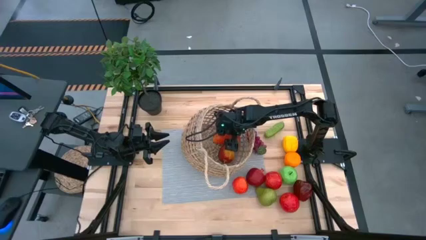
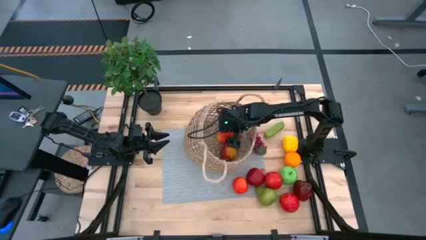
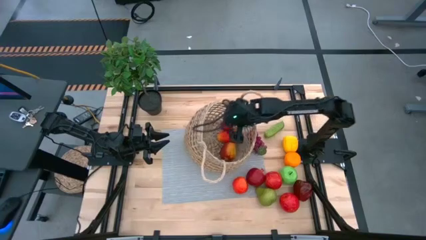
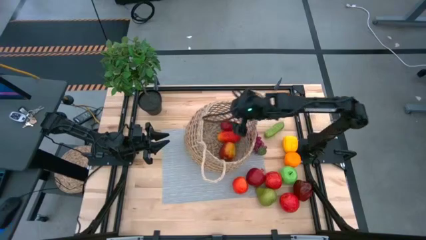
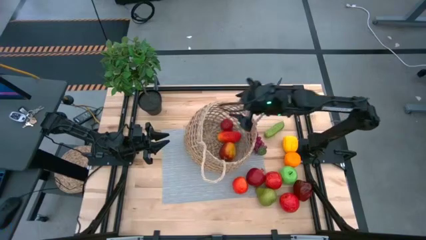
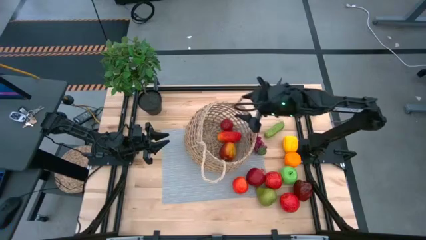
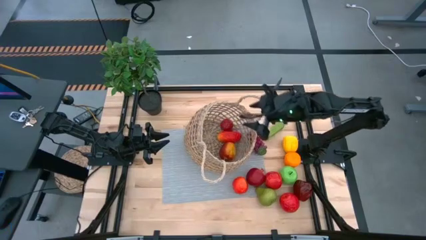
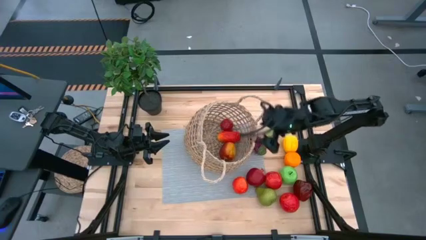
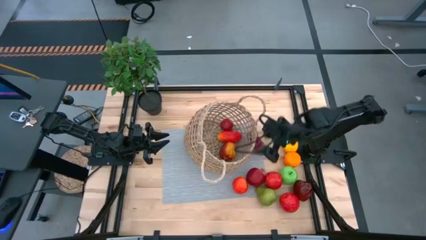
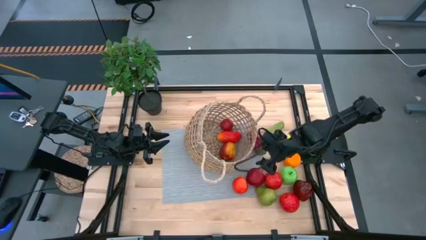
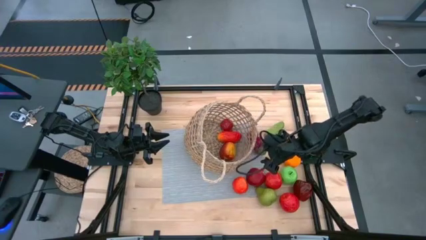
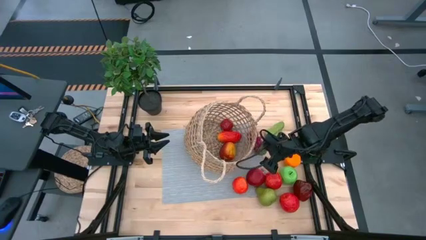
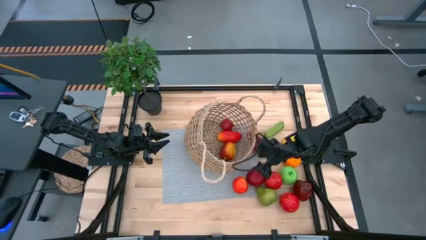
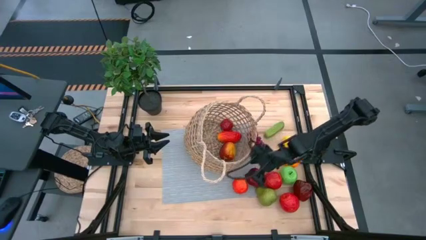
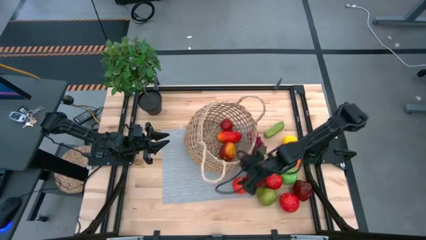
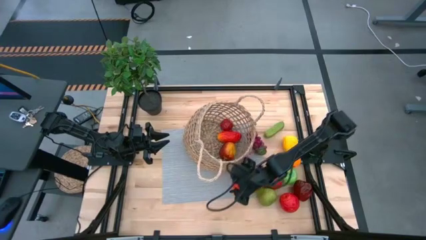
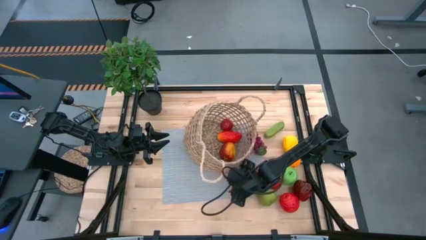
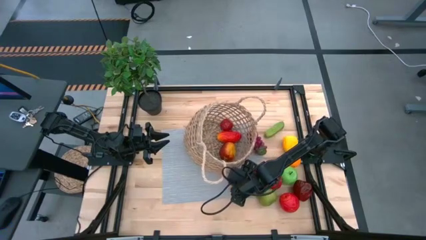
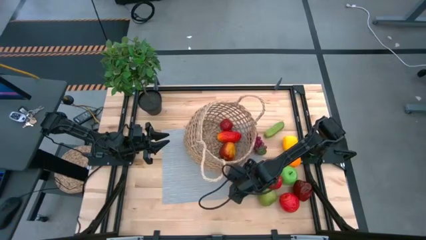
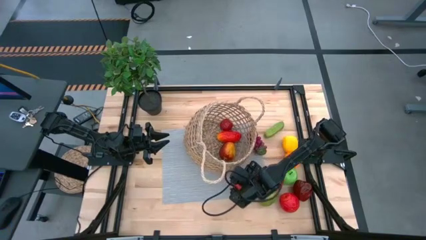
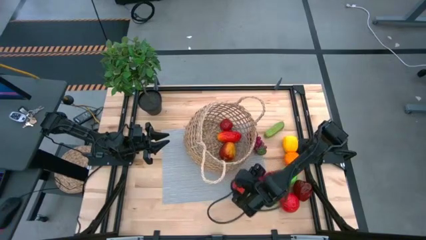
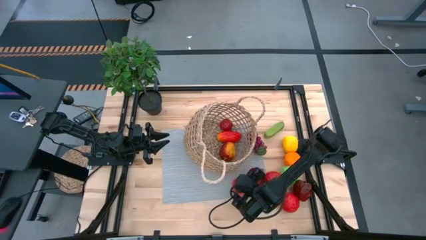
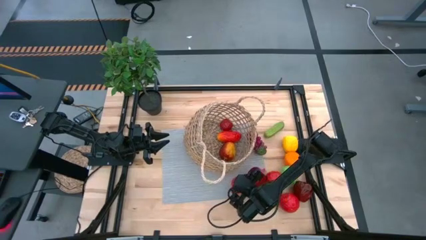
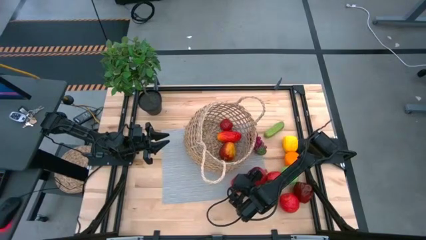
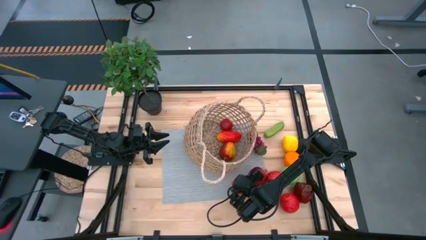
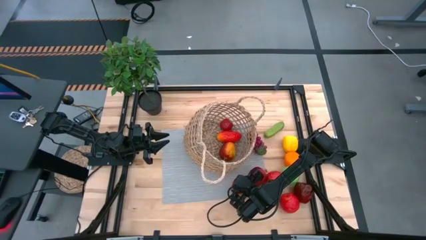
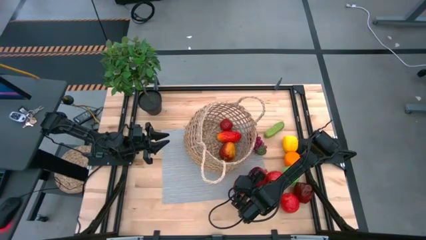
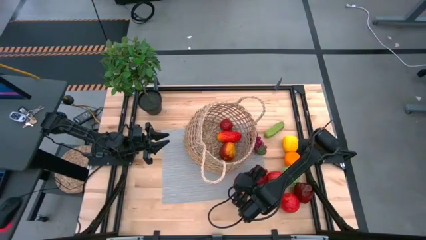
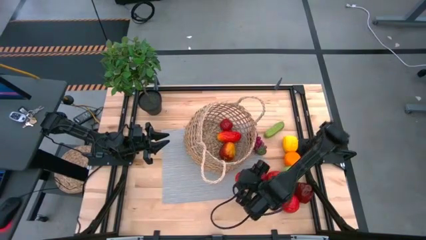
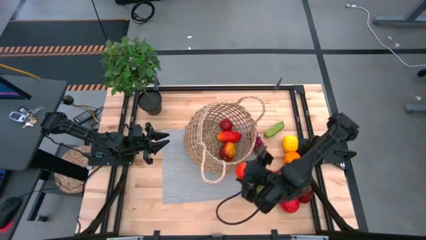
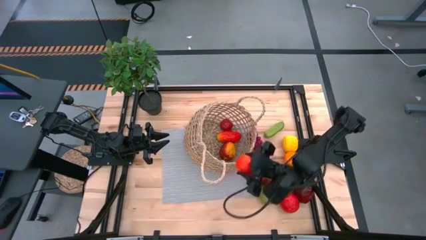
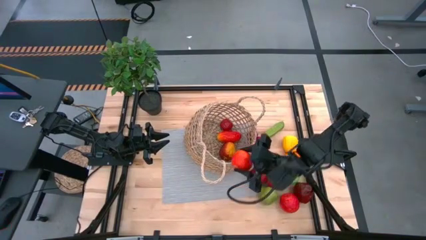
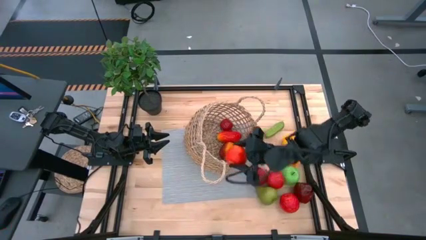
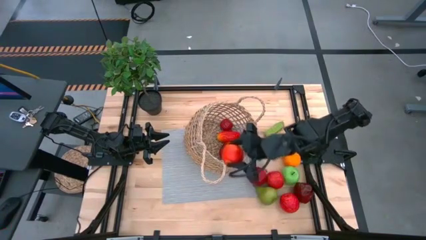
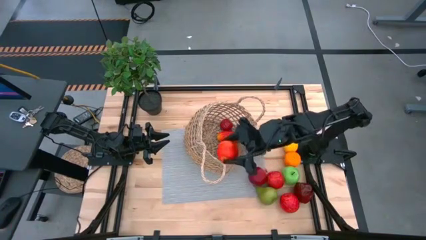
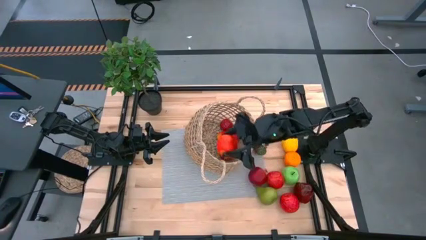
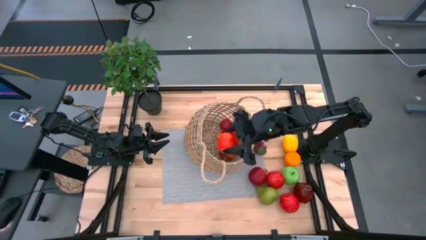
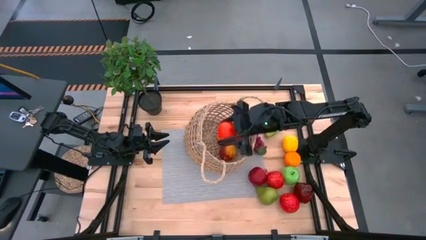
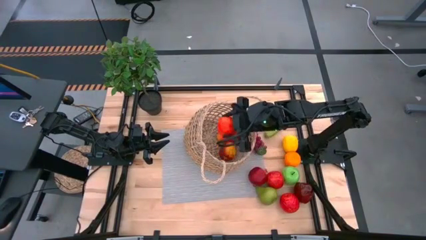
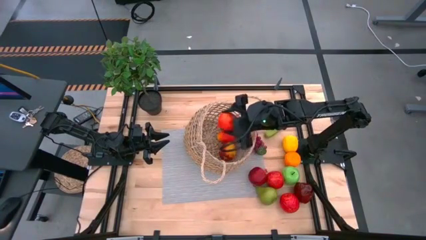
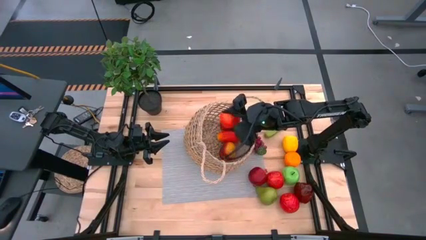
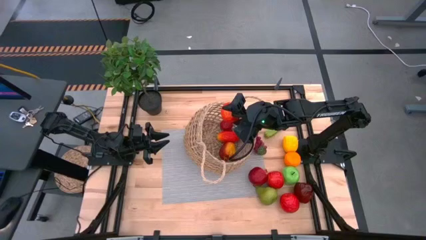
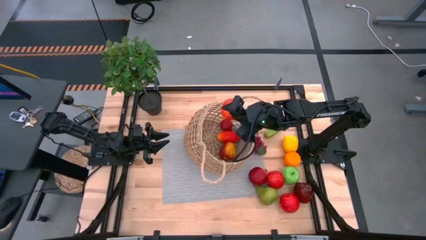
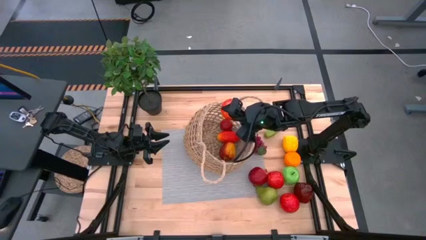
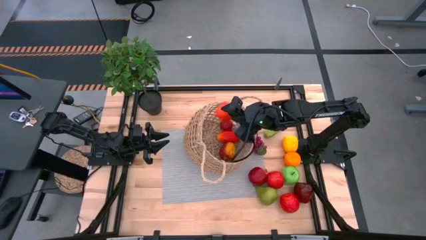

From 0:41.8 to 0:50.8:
Task: Build produce basket
Put the red apple into the brown basket

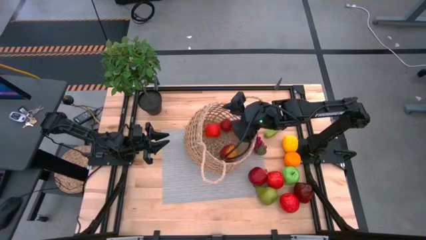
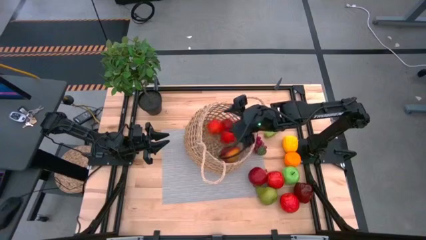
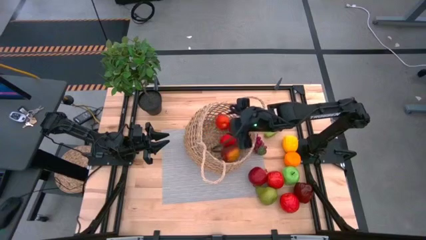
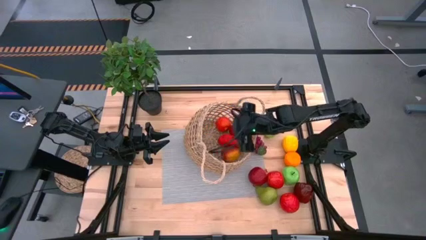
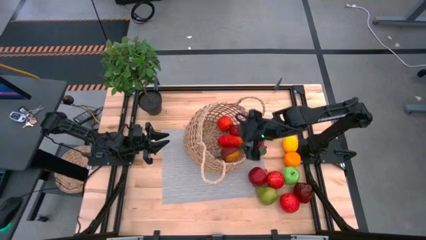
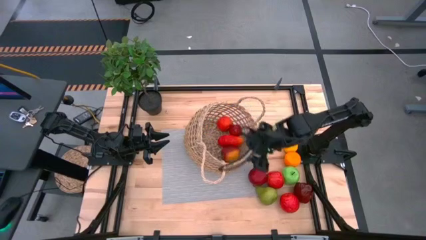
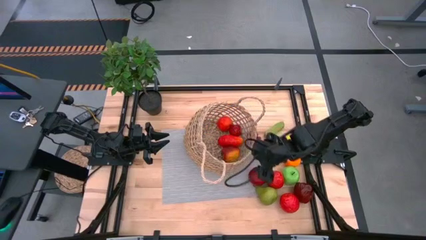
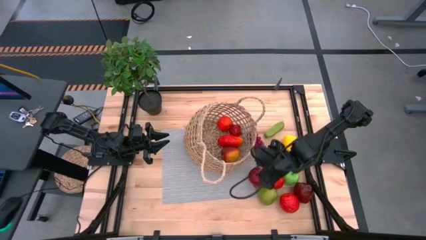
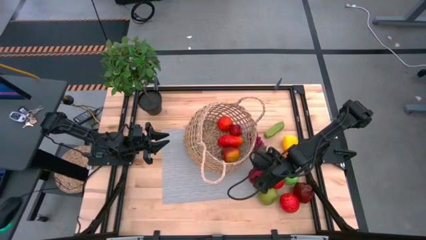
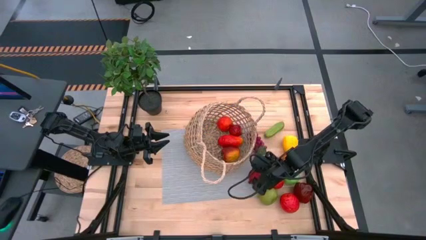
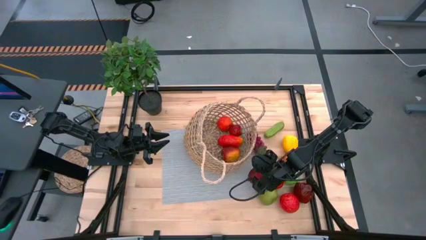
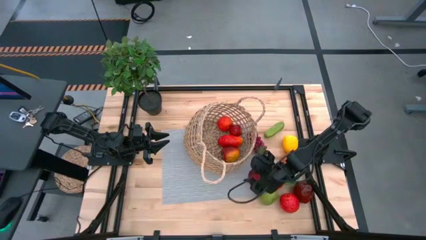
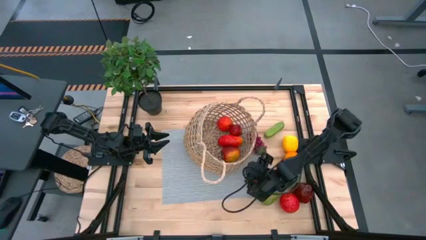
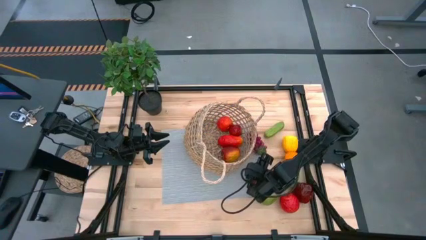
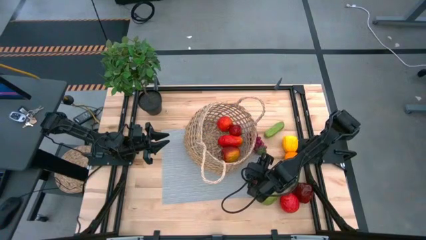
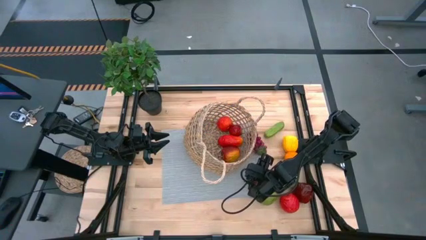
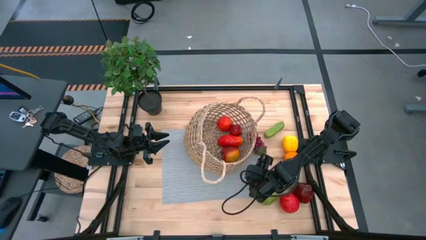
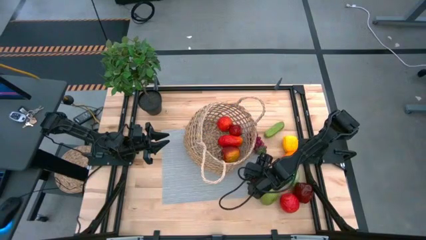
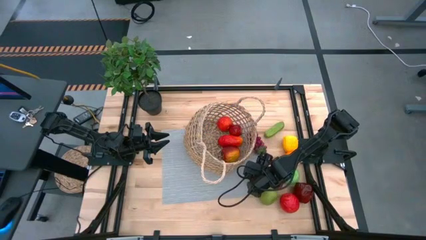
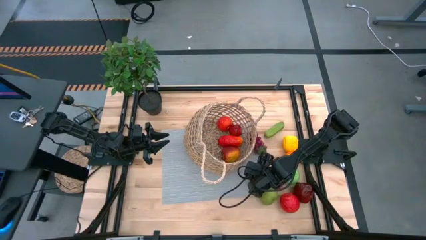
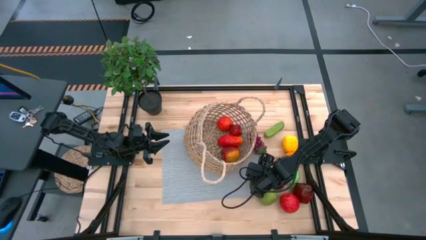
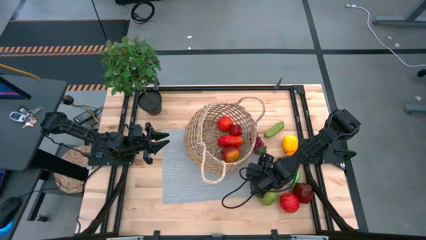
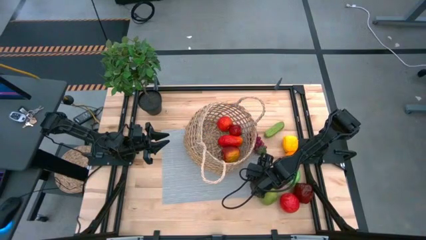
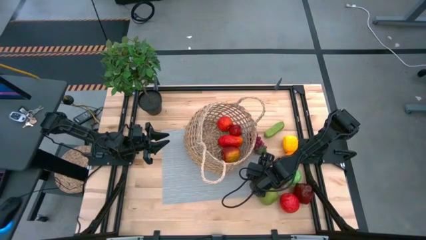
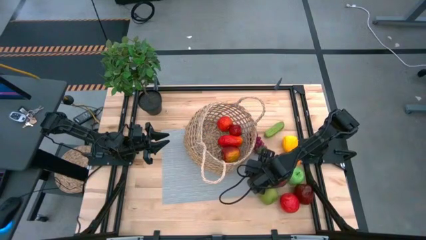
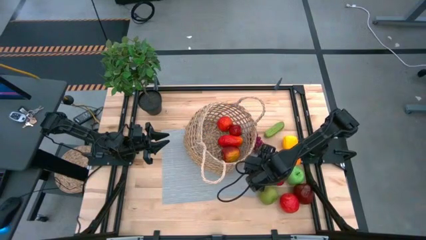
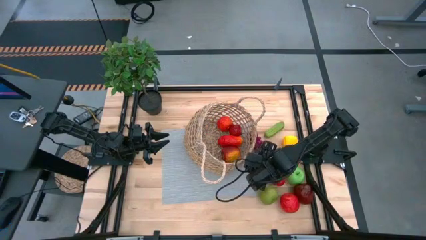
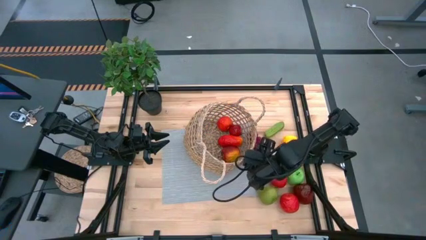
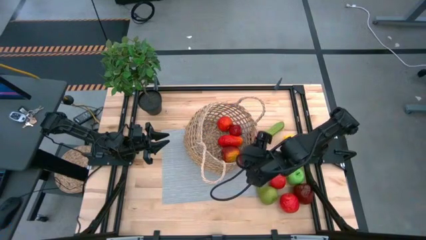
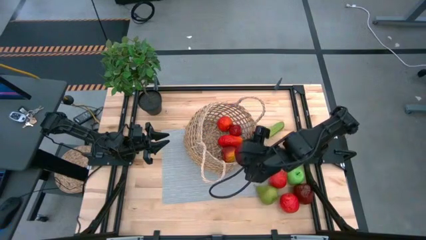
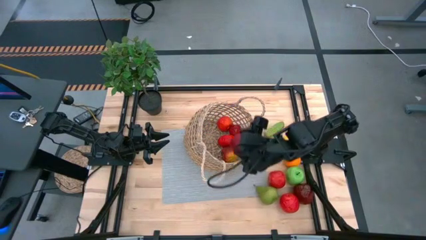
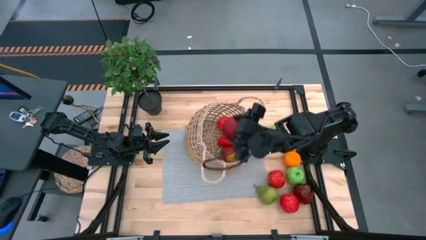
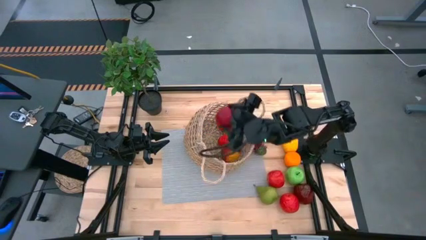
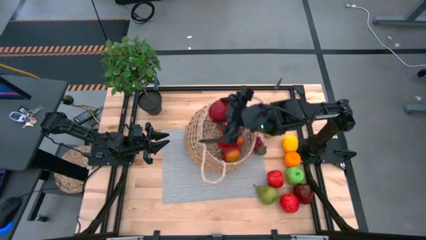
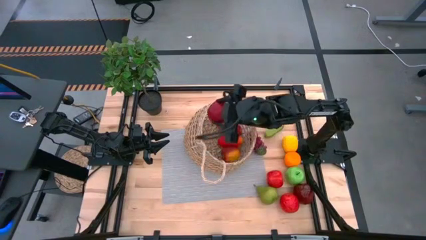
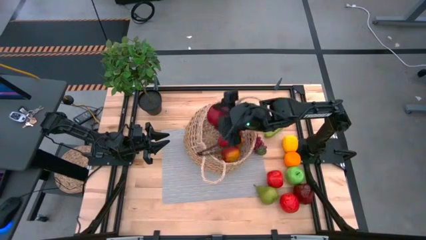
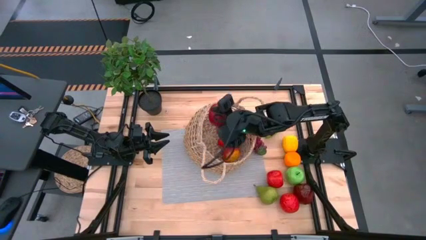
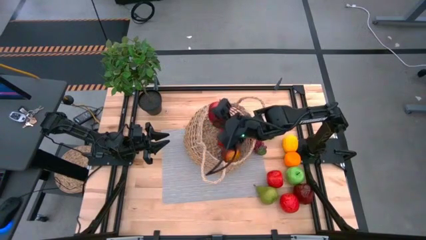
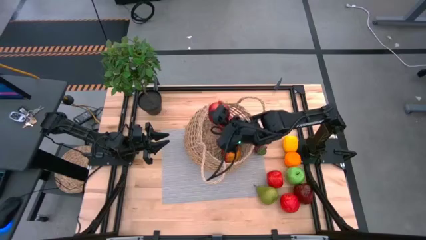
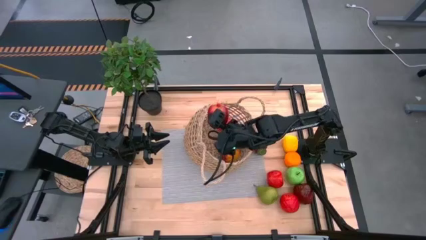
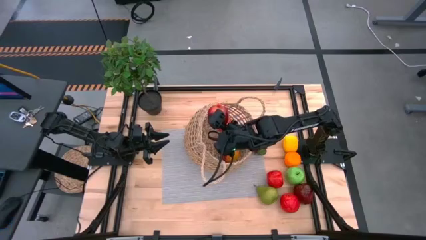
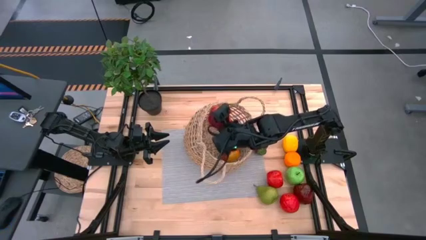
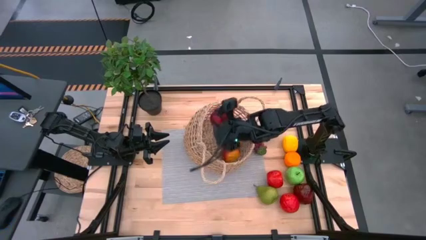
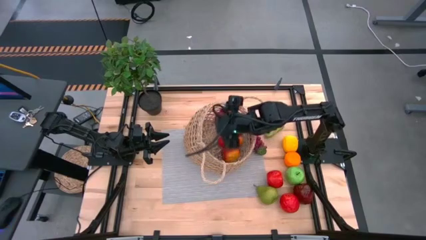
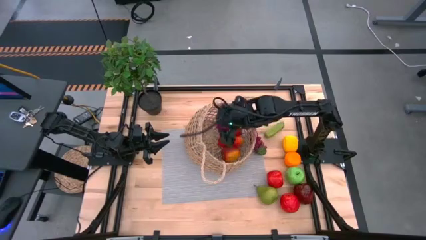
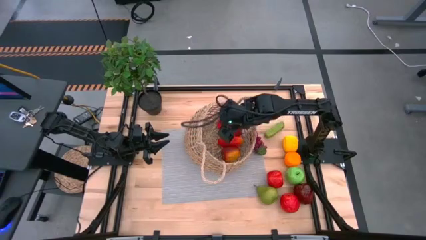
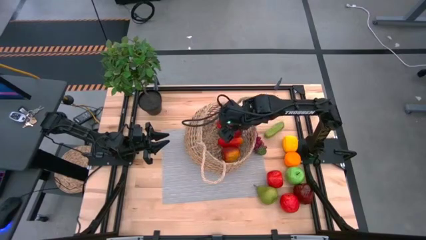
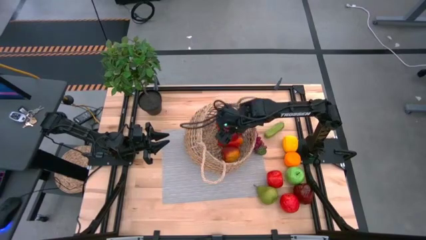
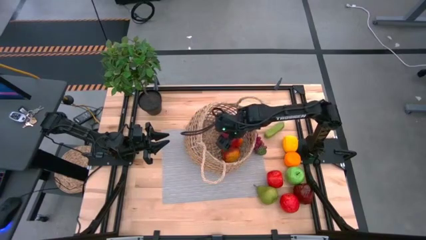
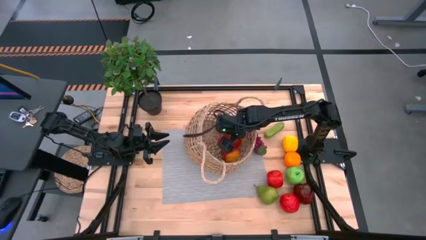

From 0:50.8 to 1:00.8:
Put the red apple into the brown basket
